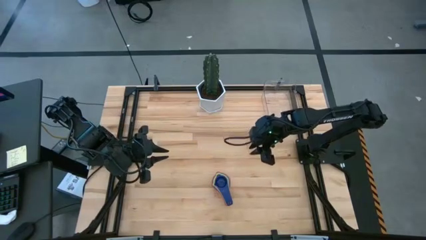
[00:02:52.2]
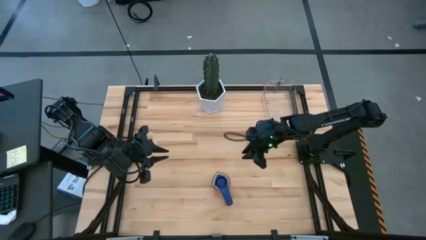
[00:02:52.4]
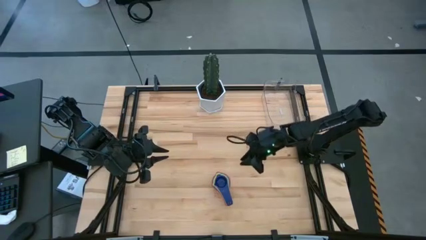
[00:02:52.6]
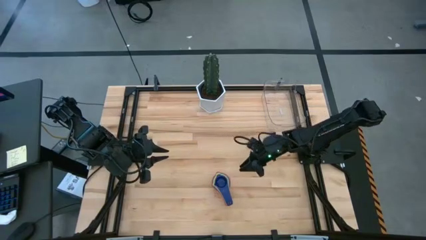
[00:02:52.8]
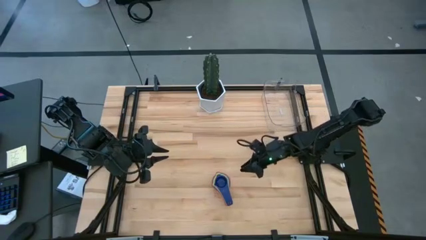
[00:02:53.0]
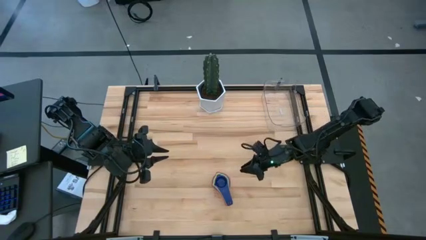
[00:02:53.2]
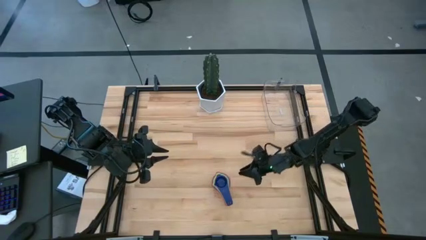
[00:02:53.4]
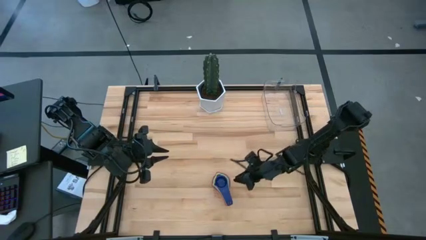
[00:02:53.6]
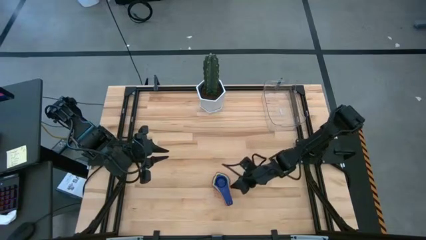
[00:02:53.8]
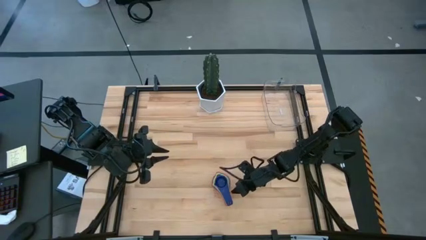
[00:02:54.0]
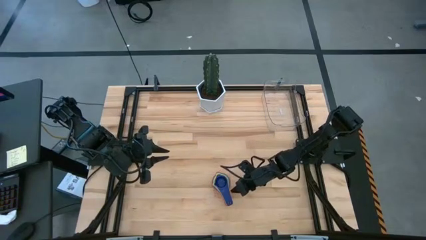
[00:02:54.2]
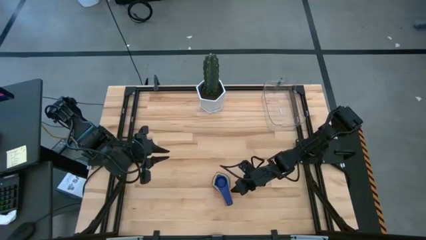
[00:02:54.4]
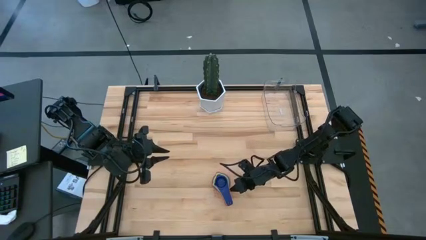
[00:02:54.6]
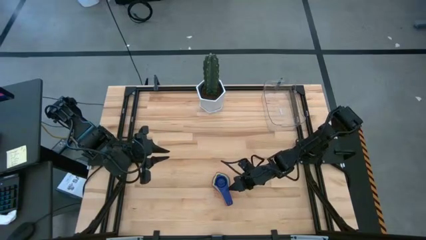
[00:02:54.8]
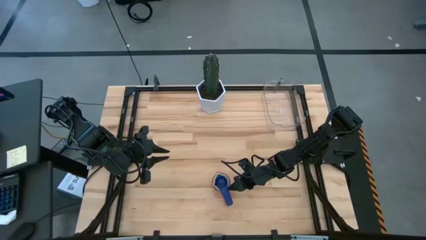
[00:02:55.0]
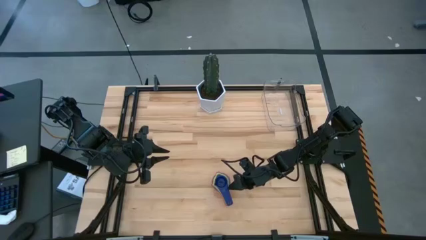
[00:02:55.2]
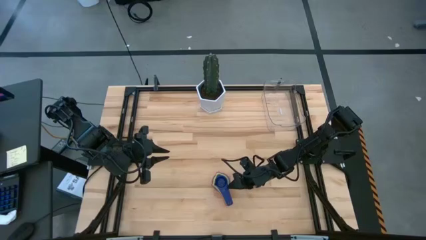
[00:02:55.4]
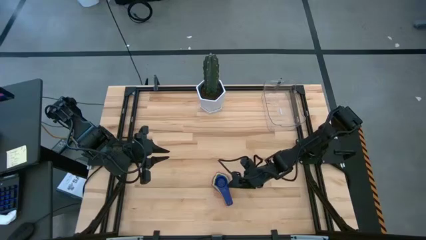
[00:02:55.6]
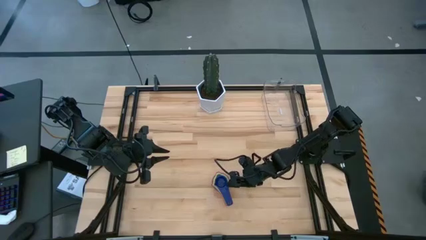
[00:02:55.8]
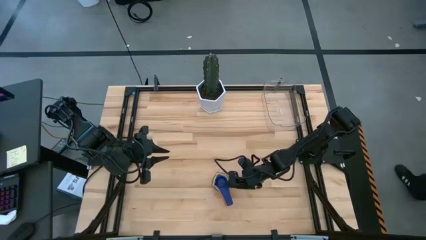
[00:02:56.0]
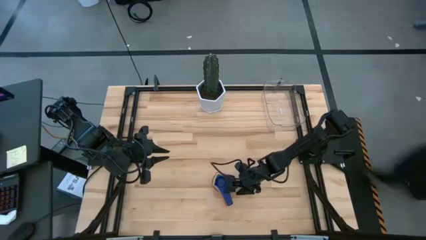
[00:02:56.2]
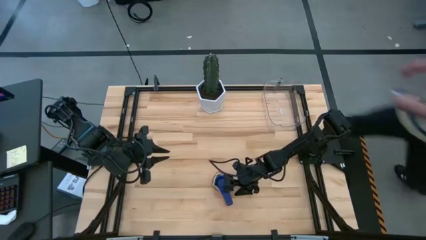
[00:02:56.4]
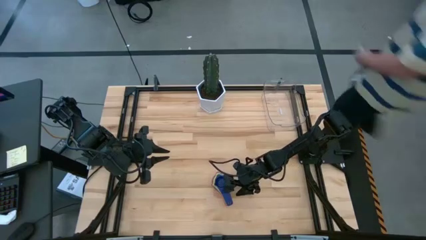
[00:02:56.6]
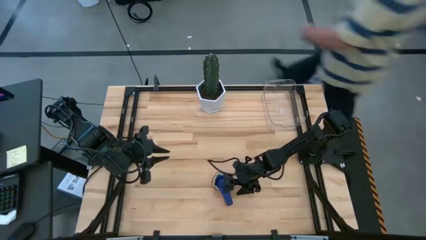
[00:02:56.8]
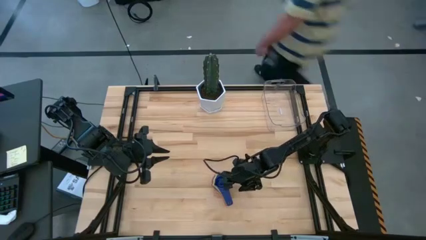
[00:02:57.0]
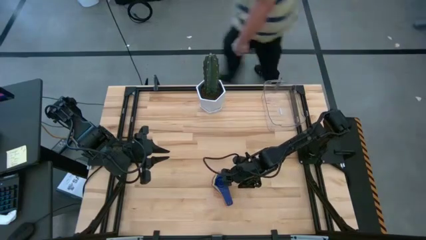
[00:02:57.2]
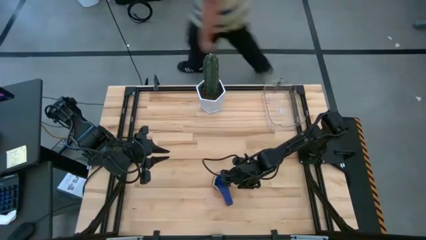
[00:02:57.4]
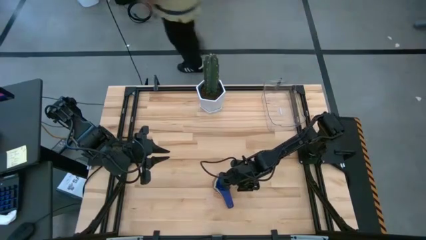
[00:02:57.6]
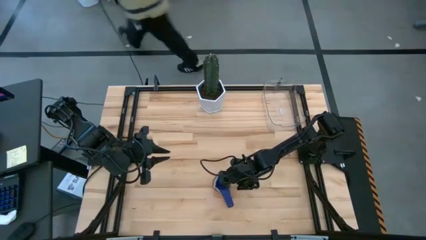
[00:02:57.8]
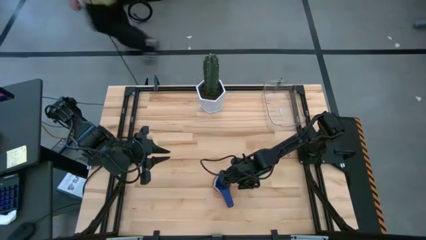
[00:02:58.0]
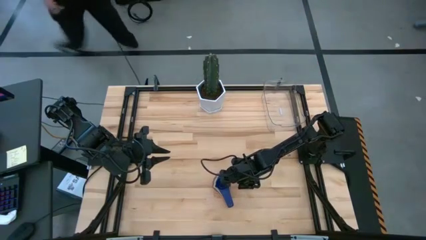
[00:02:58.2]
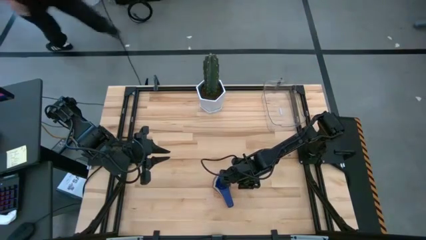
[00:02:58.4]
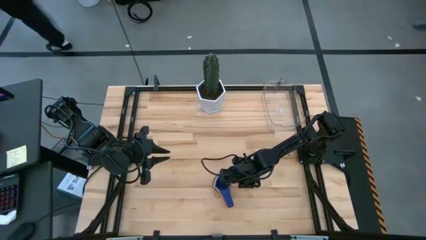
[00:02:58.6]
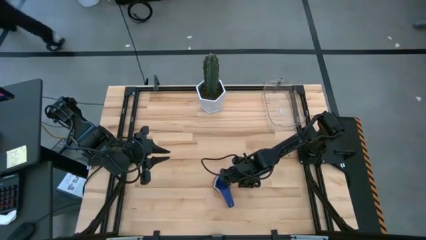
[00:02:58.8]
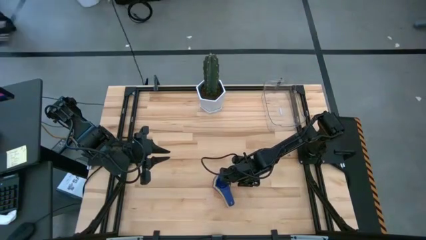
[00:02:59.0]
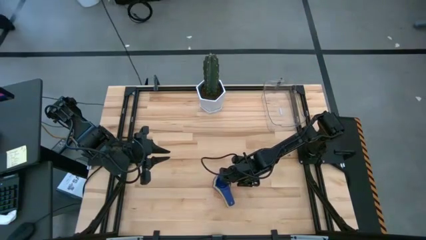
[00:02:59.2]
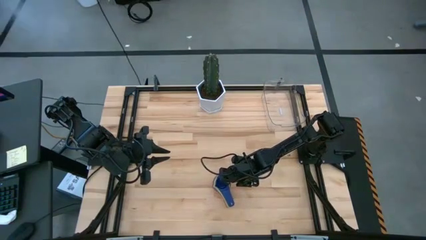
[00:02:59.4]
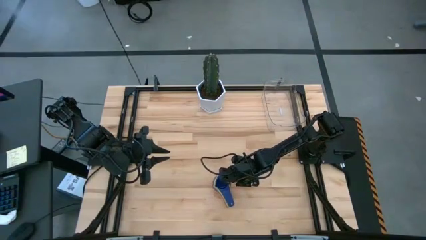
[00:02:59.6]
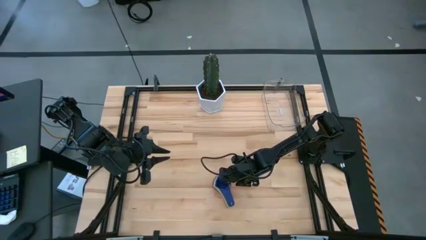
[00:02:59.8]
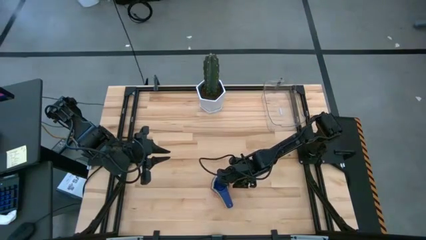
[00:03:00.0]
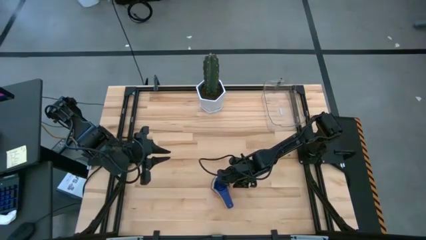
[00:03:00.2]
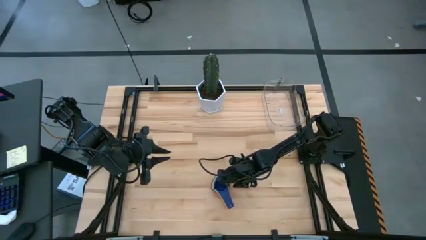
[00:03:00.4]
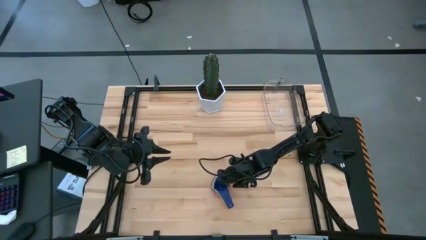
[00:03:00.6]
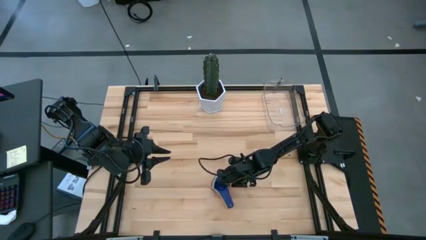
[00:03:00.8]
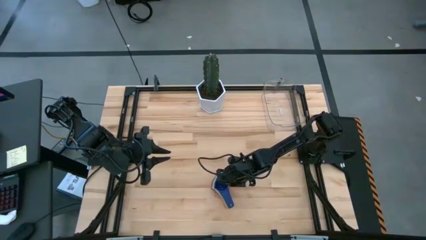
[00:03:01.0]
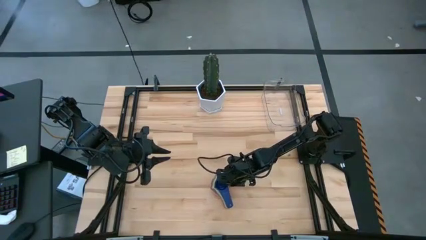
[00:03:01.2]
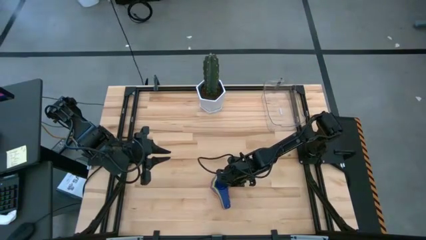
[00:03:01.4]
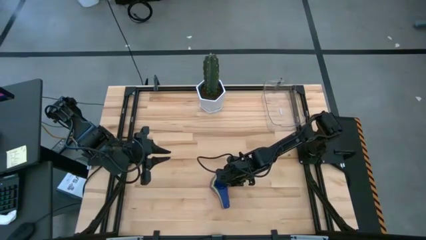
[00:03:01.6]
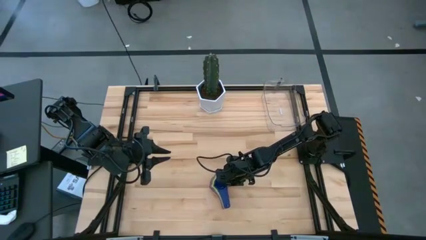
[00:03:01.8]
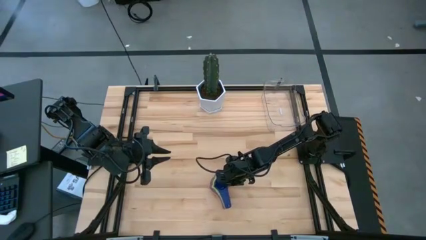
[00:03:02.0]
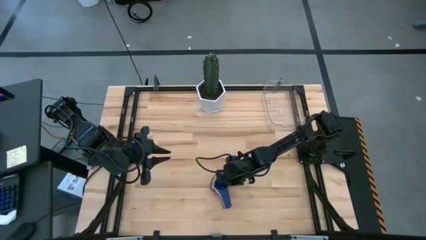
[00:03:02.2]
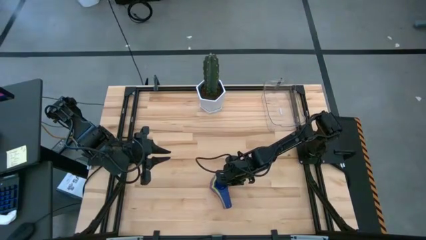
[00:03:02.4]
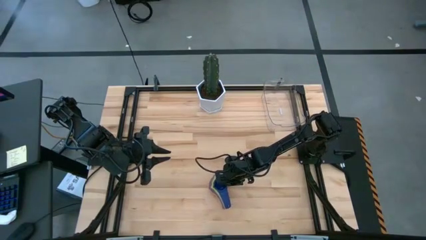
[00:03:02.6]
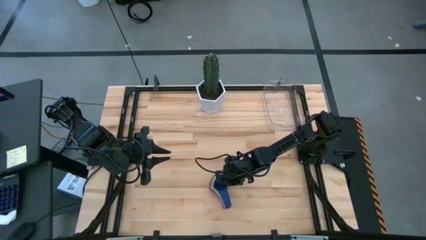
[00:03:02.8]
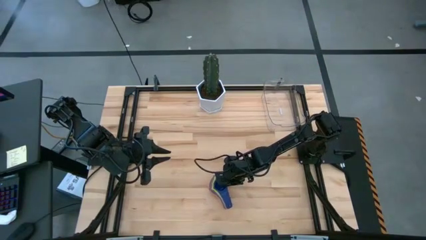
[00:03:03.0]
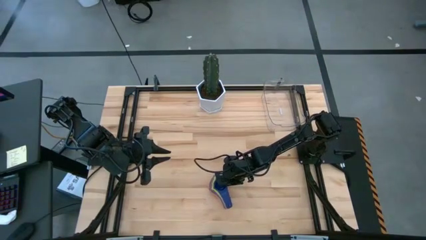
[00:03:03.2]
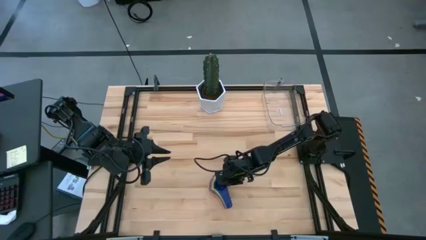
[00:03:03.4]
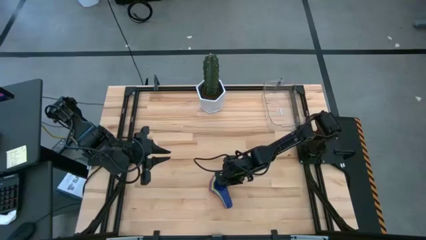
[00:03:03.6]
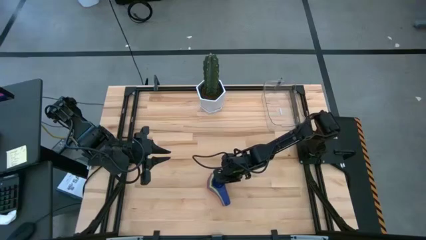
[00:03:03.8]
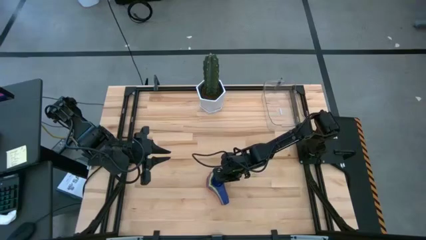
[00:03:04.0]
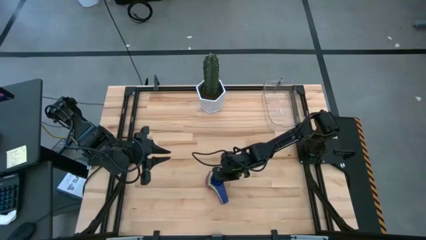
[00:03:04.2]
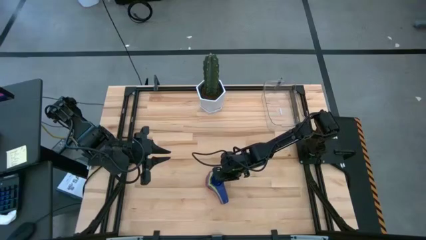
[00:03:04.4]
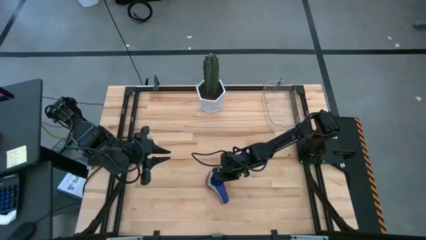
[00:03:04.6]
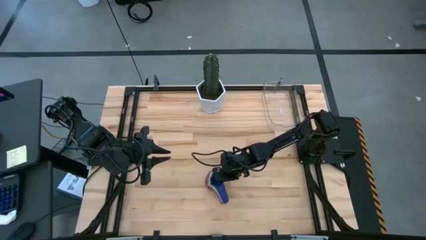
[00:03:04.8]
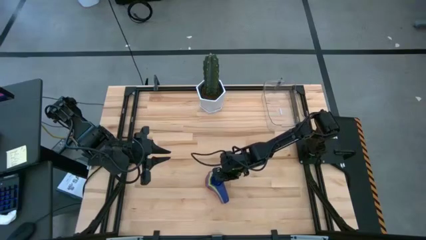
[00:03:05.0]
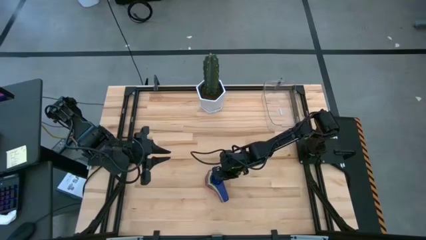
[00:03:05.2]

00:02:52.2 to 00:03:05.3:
Task: Nest measuring cups in basket
Put the stacked measuring cups into the transparent bin

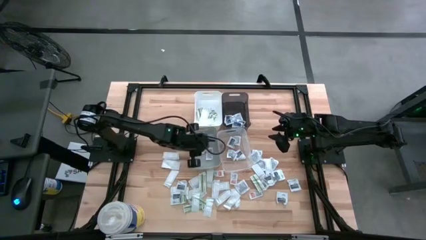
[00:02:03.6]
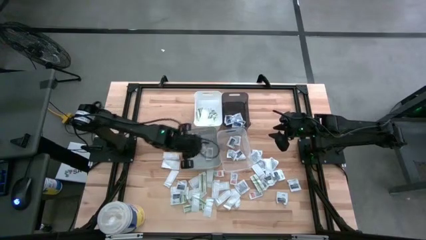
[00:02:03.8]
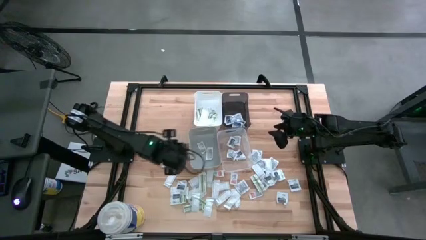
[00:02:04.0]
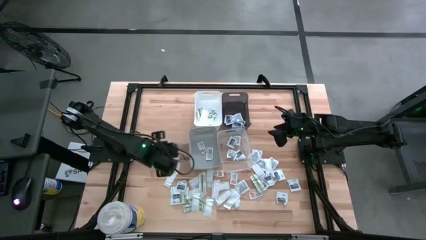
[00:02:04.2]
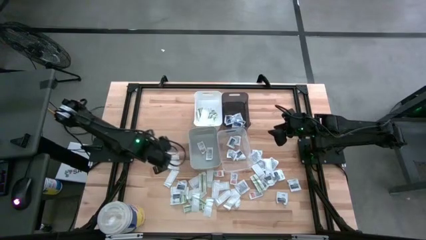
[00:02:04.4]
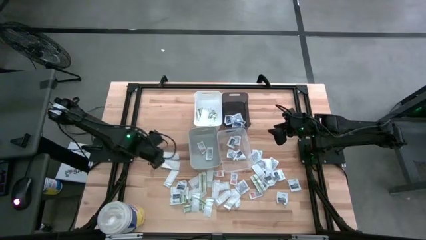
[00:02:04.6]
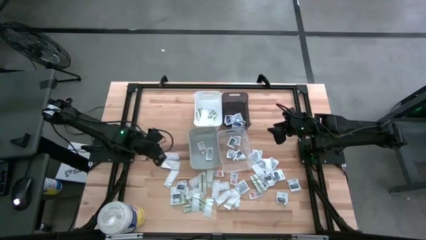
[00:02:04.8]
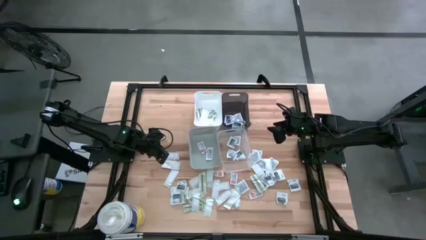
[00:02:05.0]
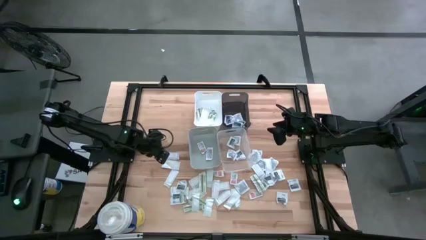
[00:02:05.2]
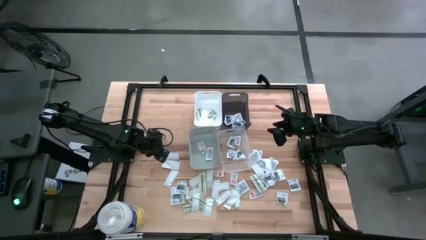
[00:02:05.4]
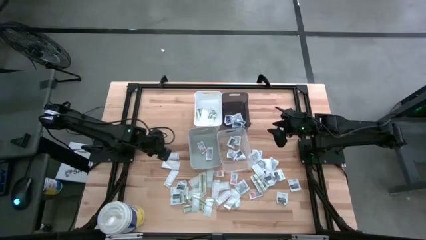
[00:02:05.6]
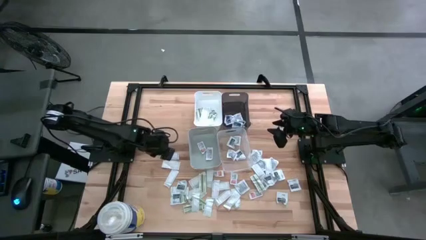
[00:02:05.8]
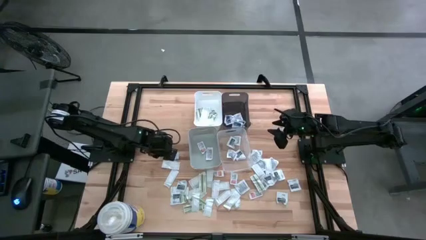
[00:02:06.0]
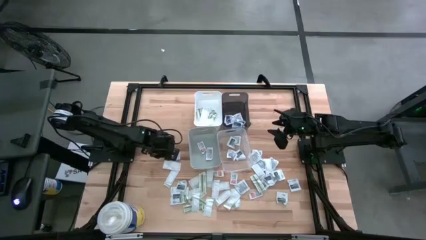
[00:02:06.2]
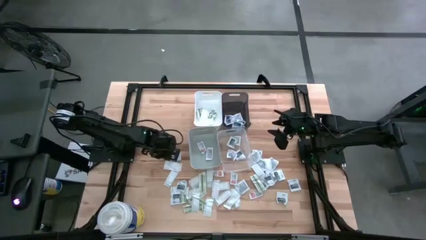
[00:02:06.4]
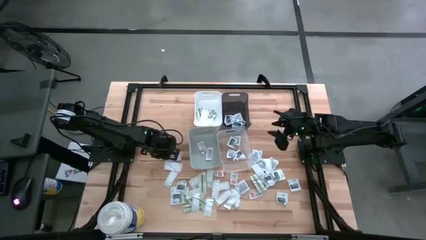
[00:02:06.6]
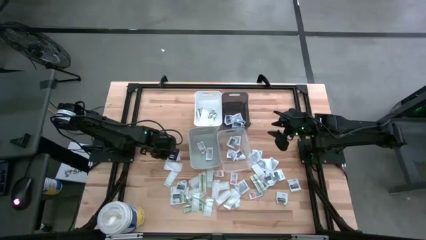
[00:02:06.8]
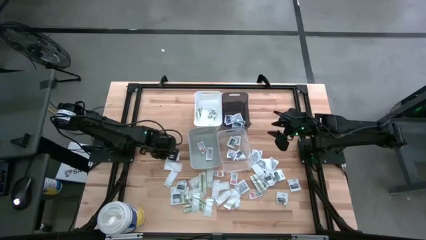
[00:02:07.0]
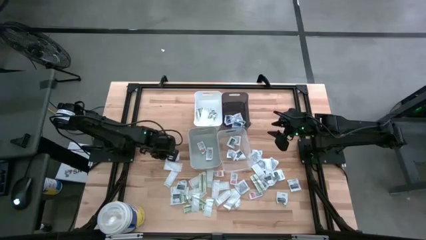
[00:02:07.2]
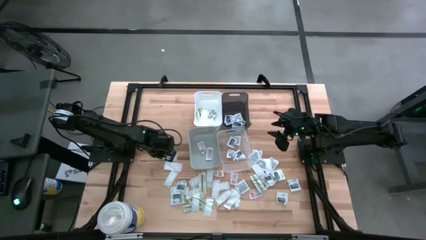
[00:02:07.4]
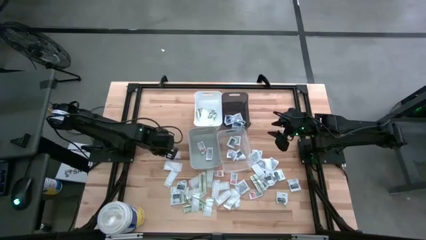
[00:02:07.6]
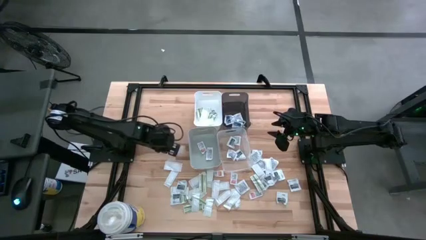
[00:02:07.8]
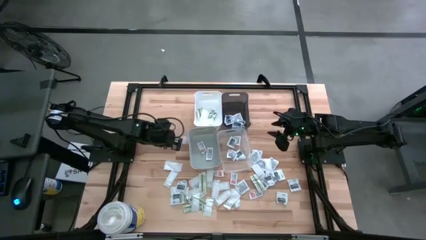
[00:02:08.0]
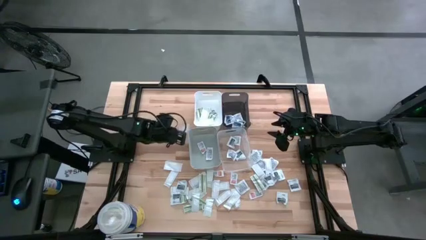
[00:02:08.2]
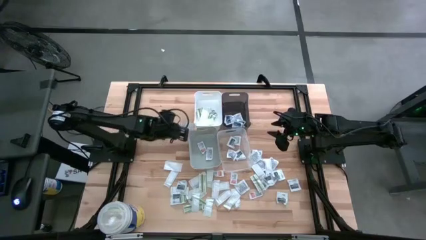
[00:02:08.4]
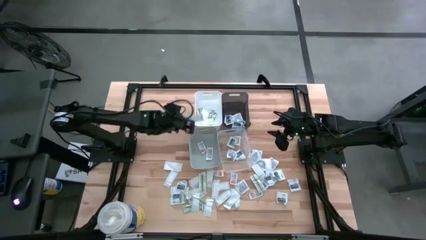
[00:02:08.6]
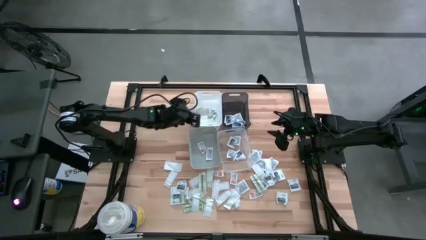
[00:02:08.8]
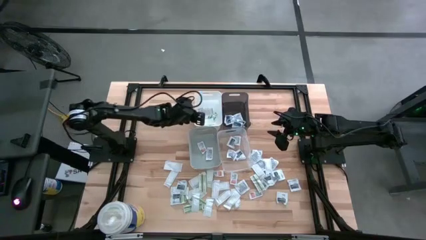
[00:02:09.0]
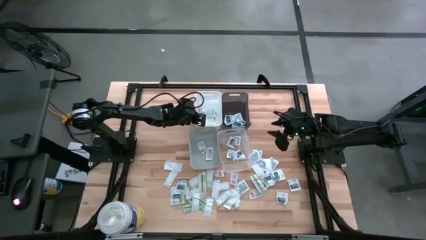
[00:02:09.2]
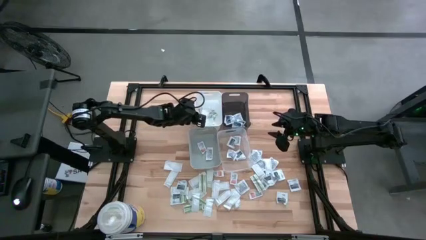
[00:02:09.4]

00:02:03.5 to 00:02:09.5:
Task: Pick & Place First Aid Supplies
Put the green bandage pack into the white bin
